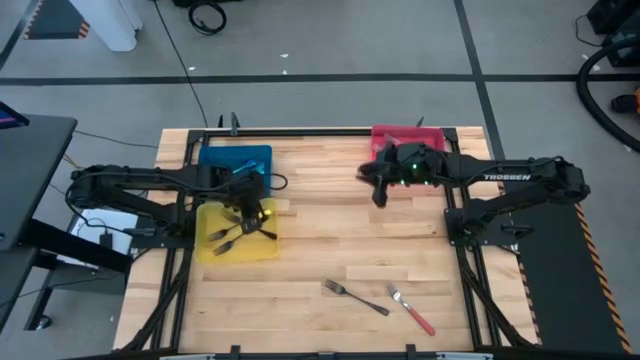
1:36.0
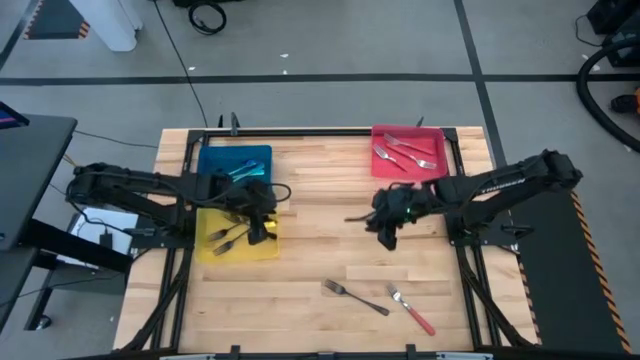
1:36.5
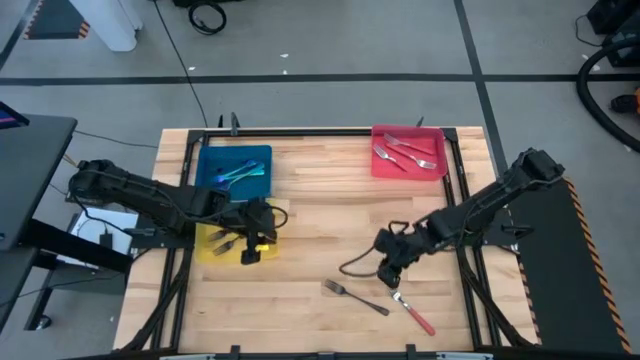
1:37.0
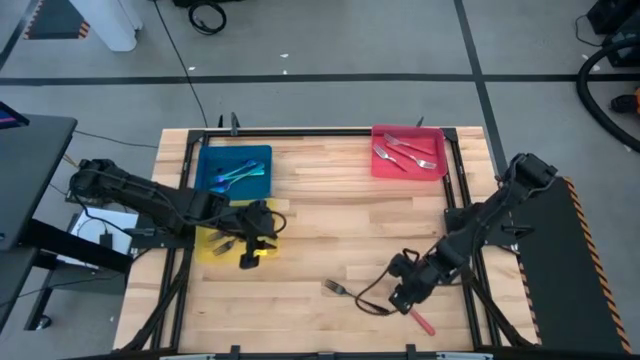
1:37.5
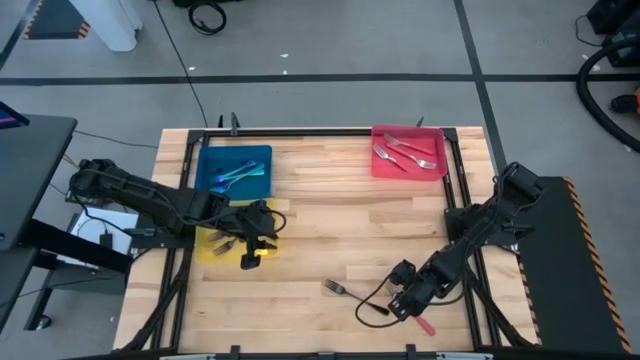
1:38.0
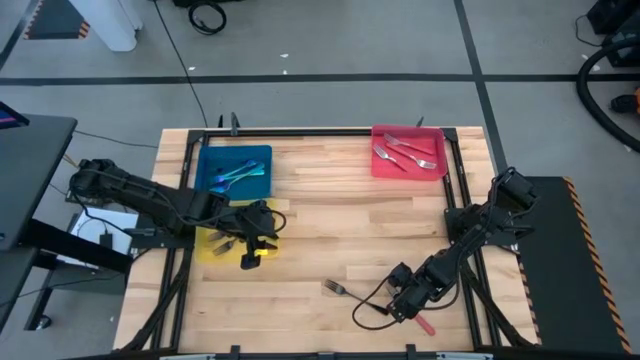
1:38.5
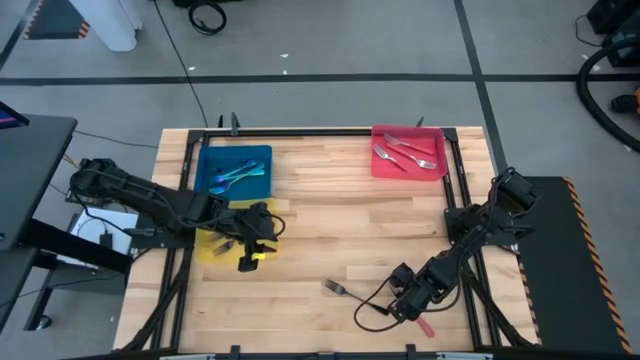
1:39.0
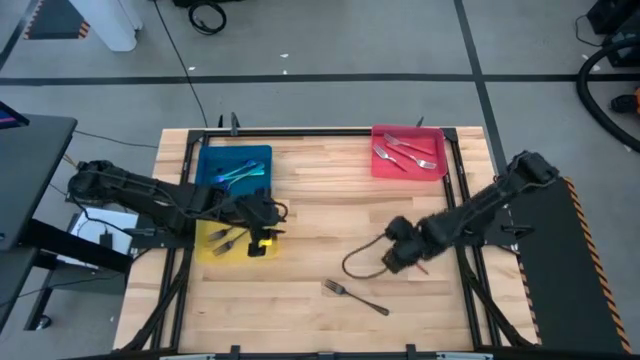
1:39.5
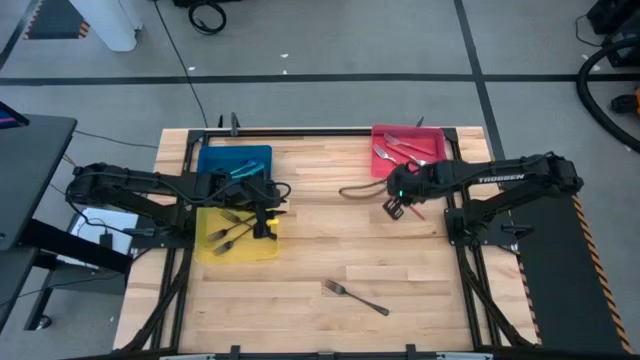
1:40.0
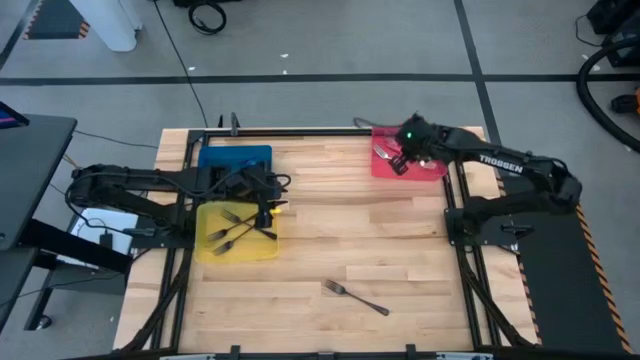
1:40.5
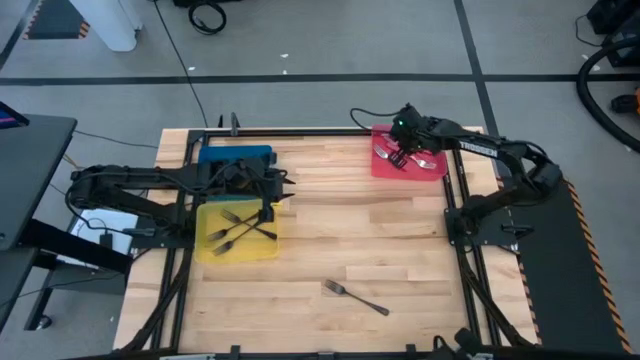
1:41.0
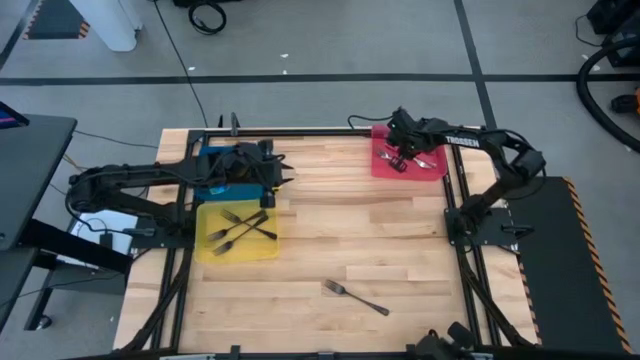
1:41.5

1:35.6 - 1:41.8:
Task: Sort silverware by color (type)
Put the red fork into the red bin

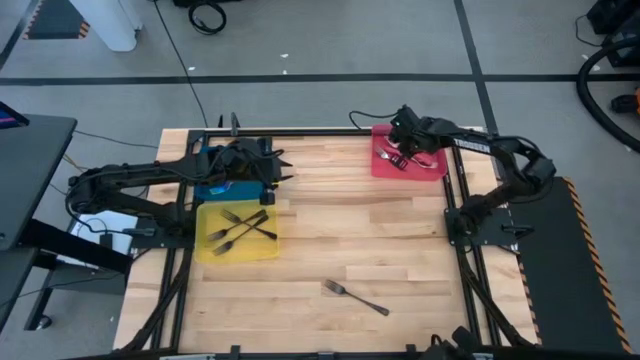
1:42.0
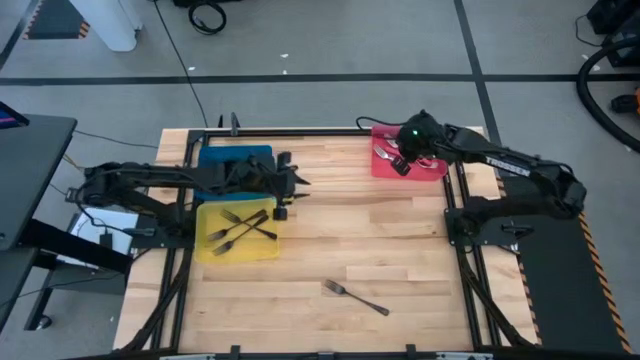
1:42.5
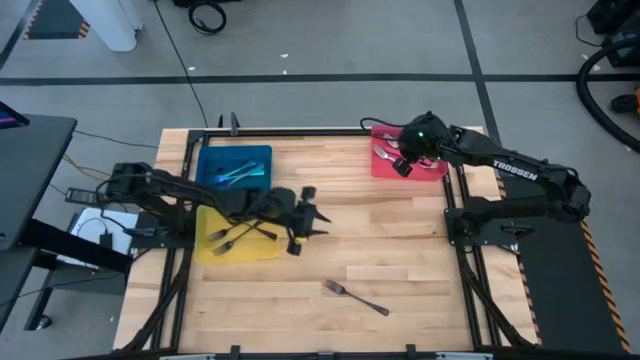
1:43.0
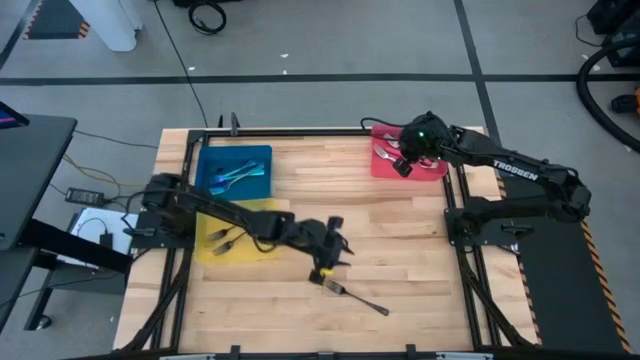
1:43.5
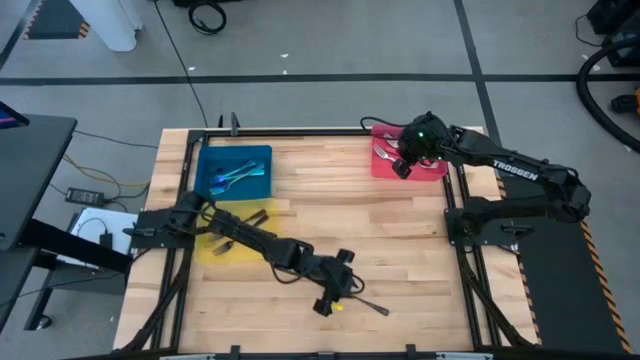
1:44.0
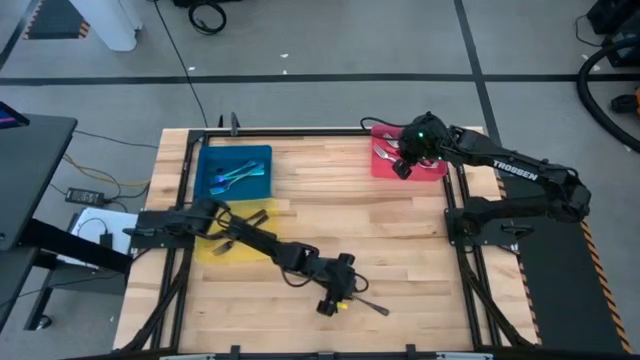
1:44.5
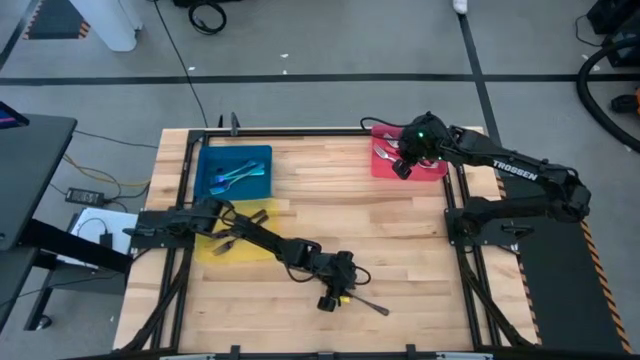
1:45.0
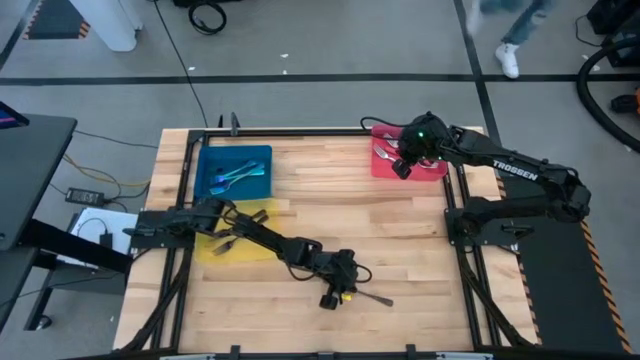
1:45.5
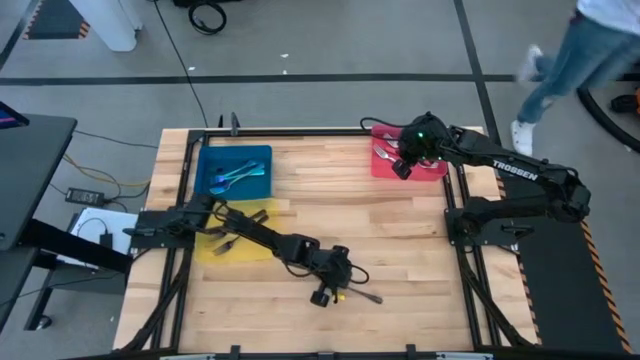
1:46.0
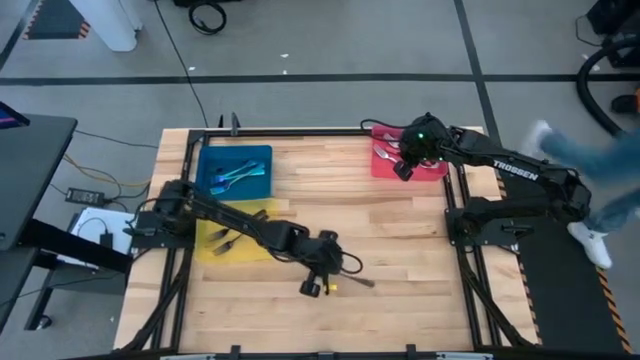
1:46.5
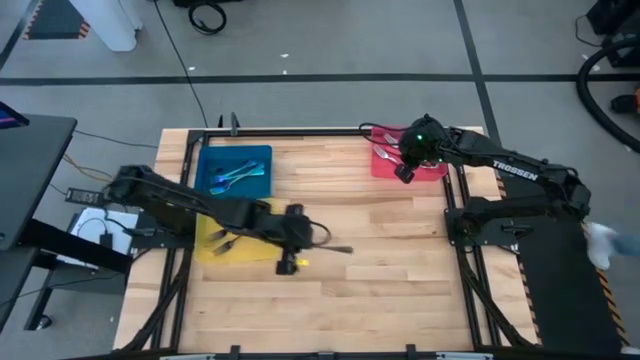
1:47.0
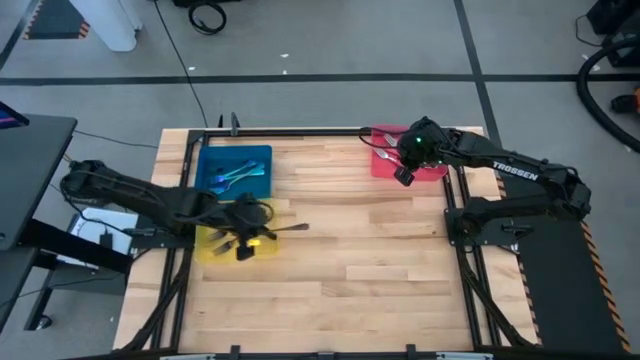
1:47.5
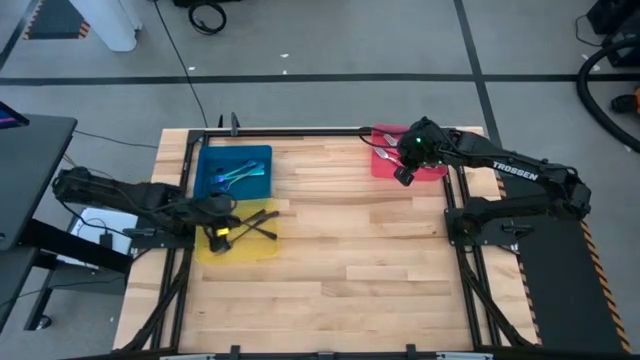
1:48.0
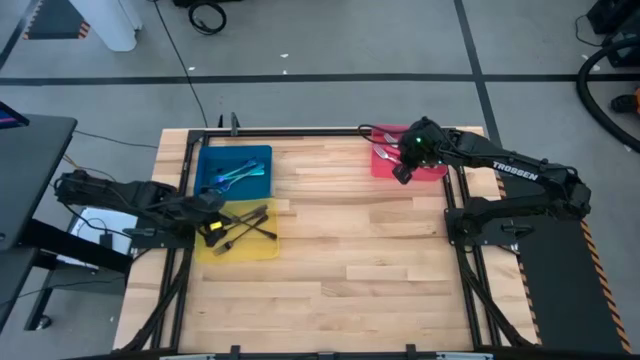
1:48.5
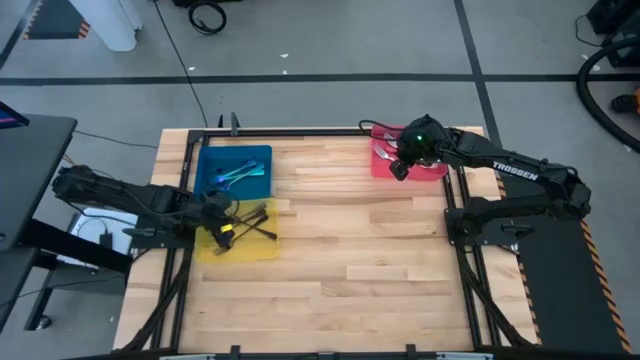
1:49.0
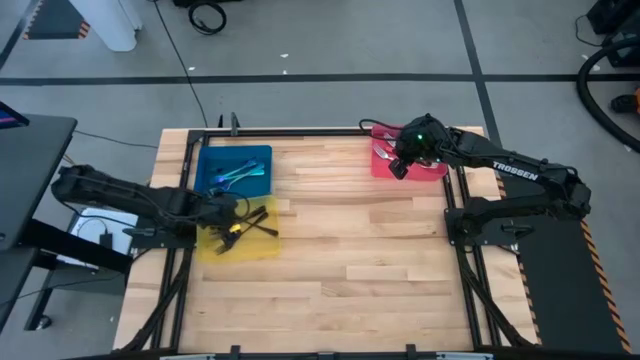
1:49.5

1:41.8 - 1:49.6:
Put the black fork into the yellow bin

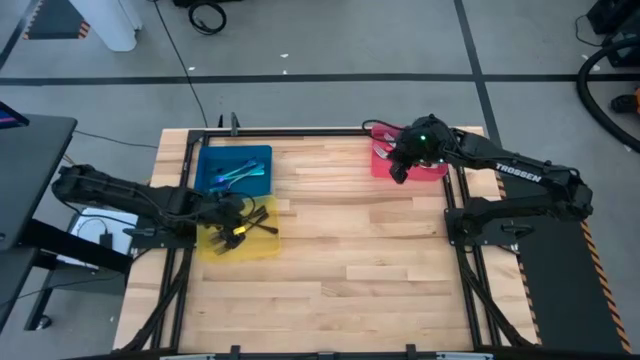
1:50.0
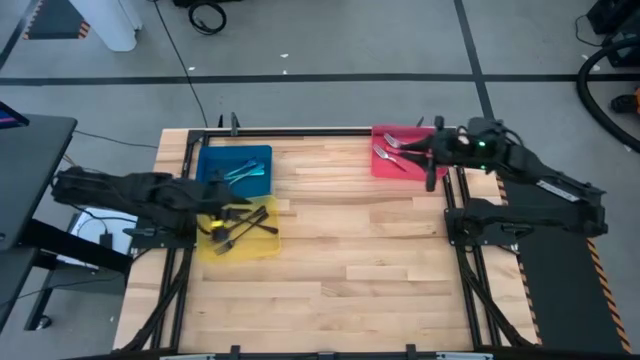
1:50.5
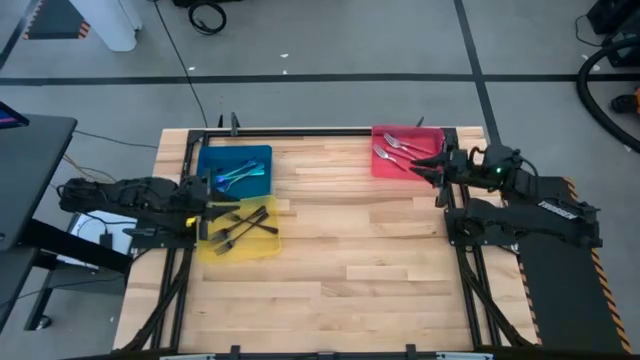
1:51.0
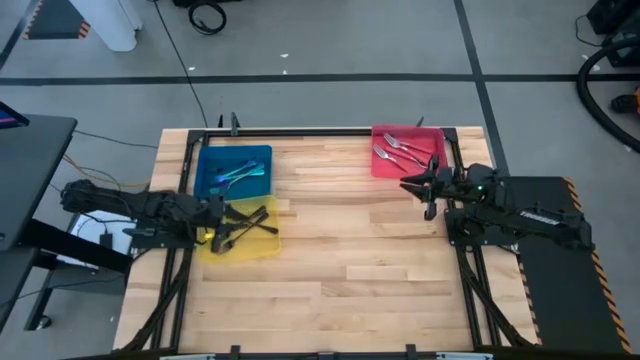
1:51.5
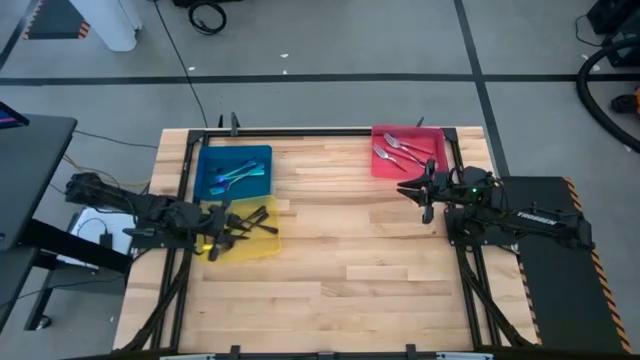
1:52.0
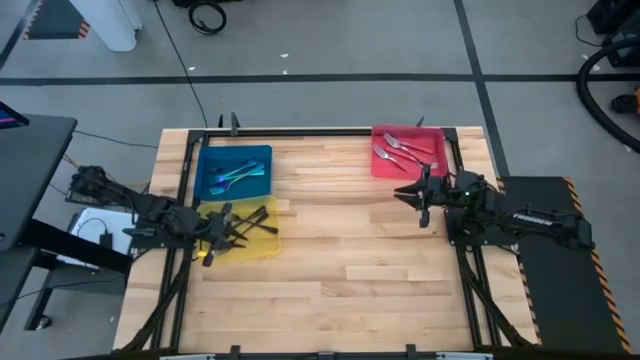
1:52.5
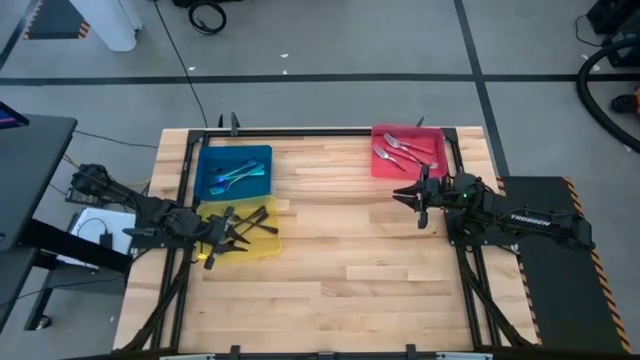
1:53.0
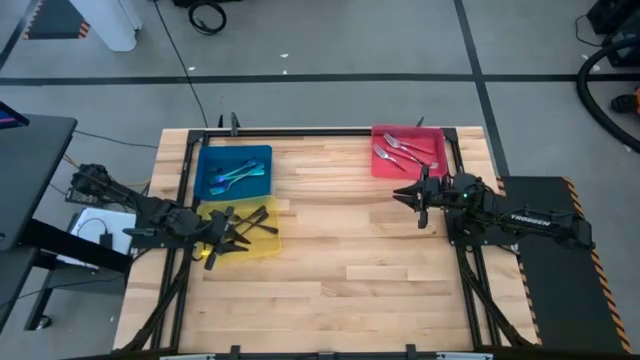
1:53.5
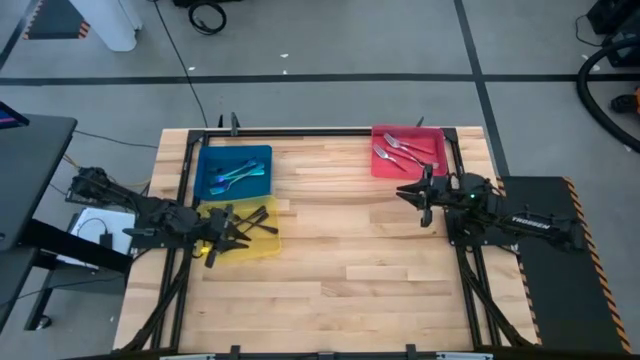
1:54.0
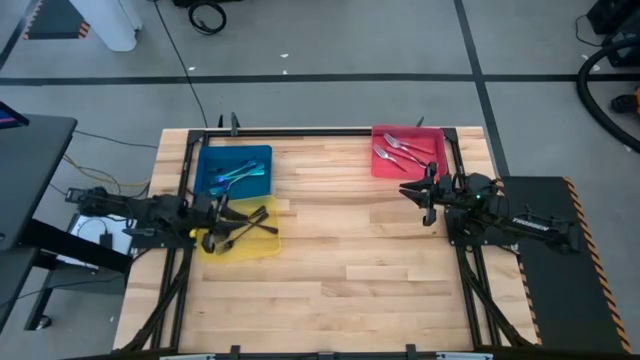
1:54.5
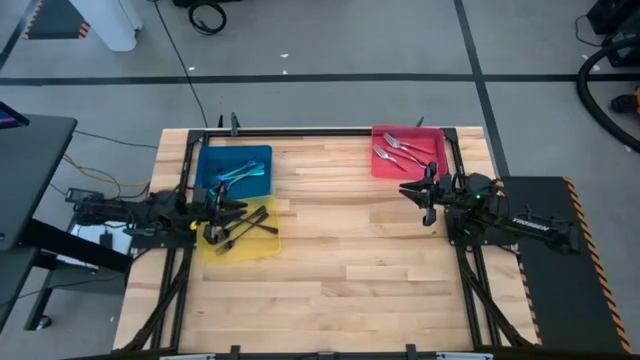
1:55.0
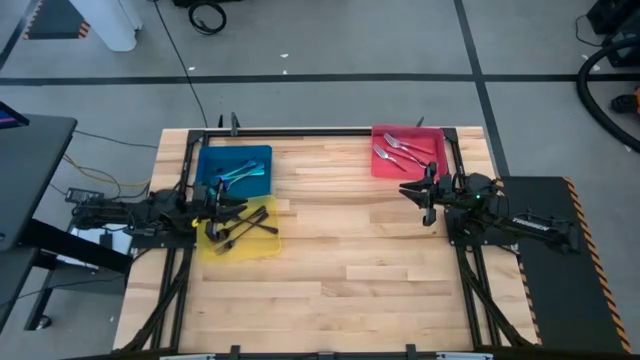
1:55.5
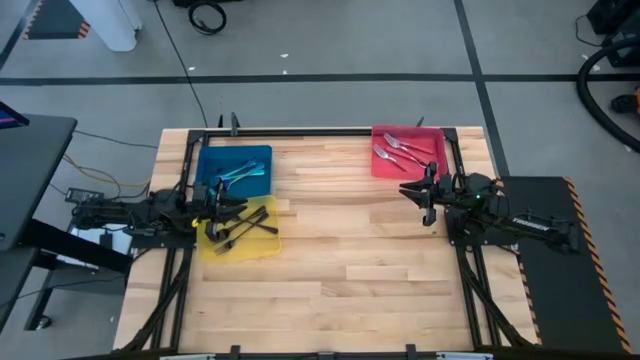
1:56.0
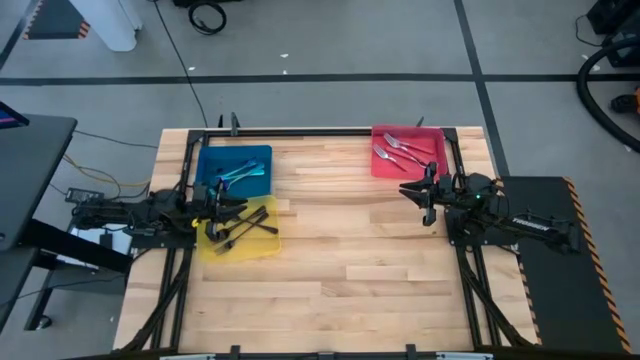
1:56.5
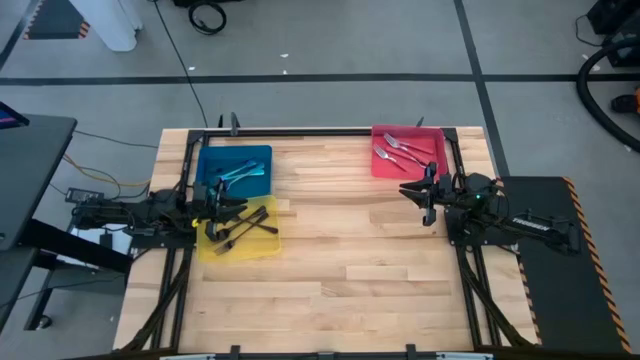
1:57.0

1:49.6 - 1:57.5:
Return to Home Position
